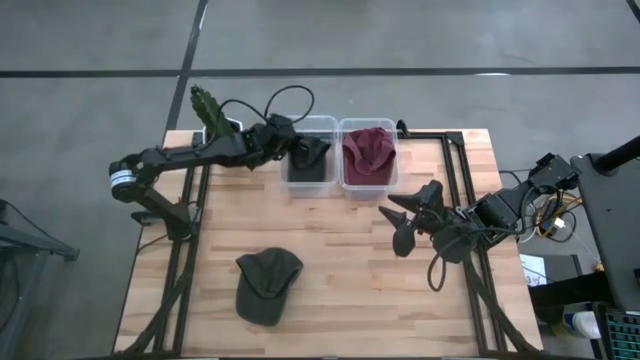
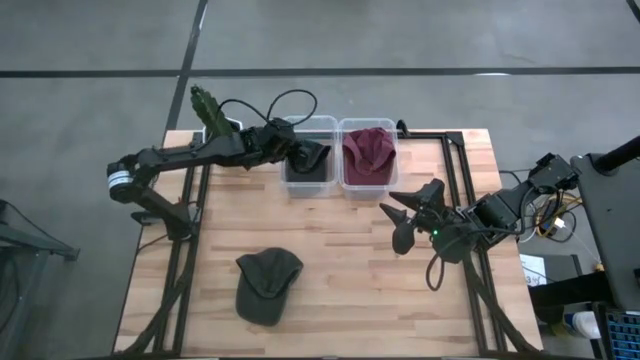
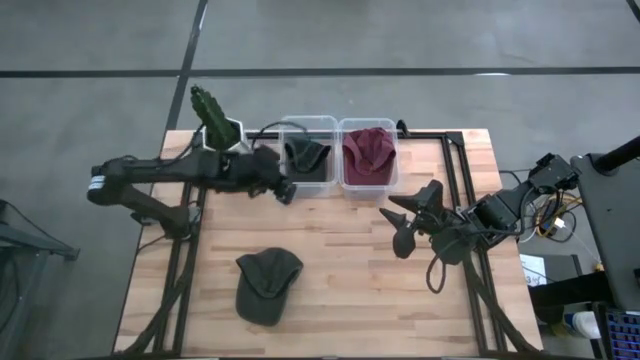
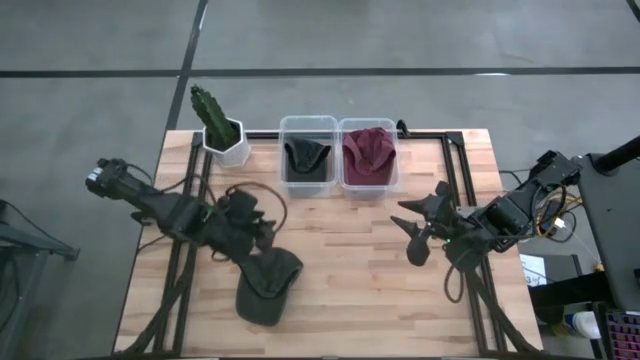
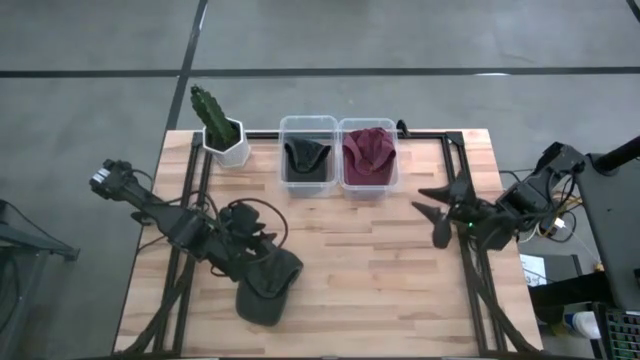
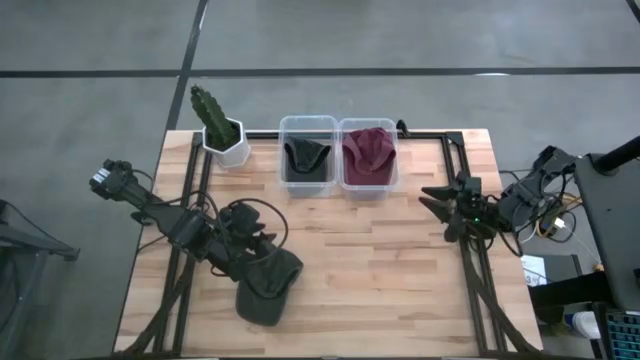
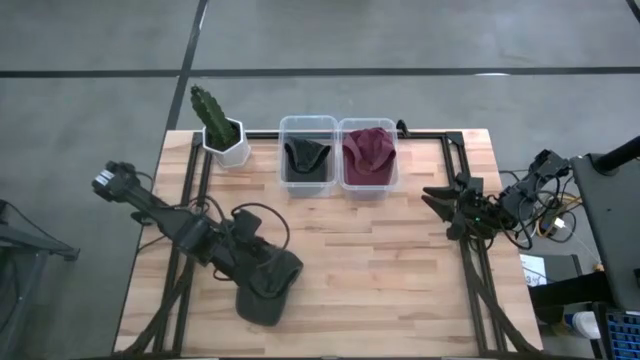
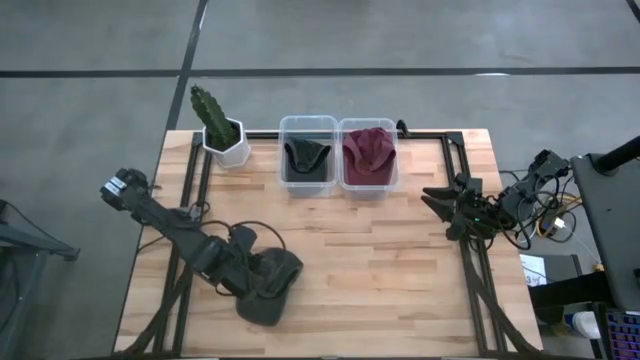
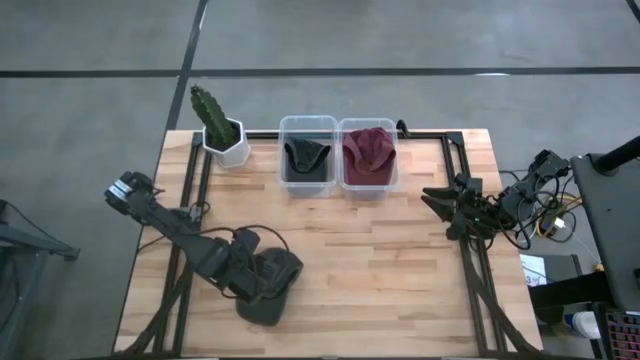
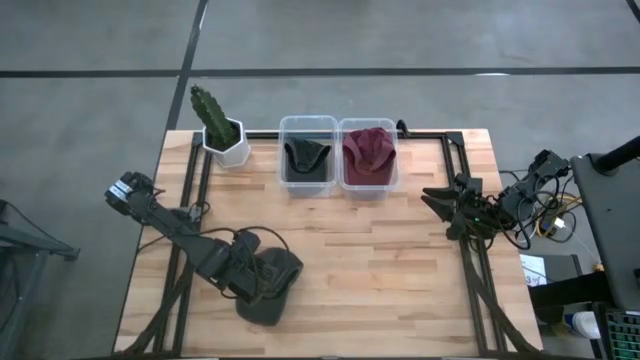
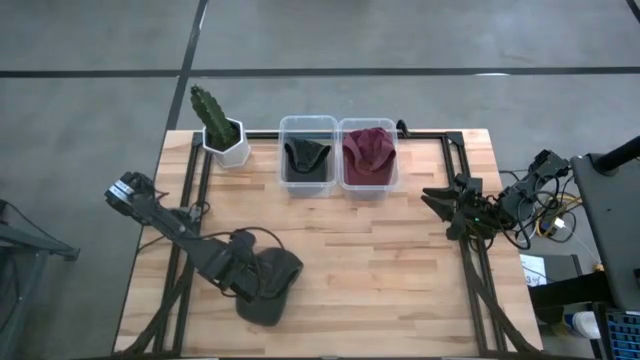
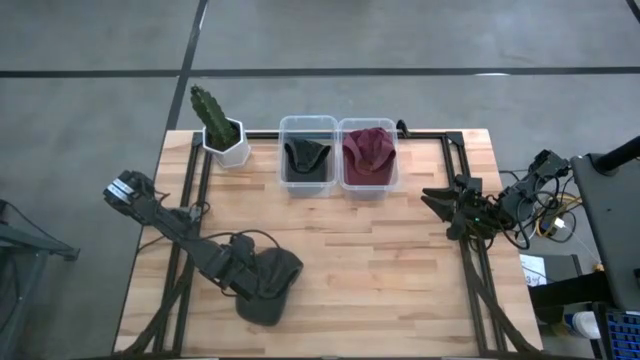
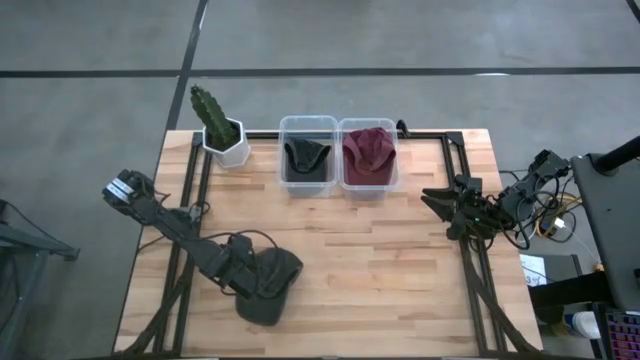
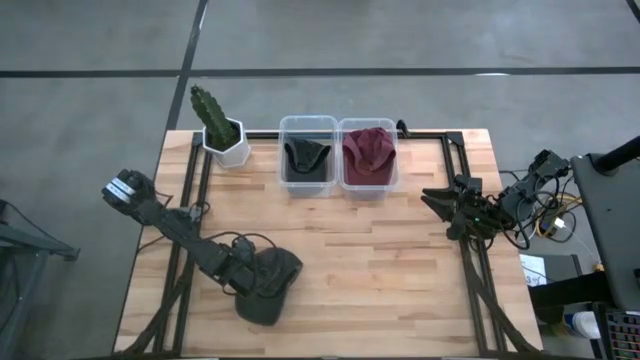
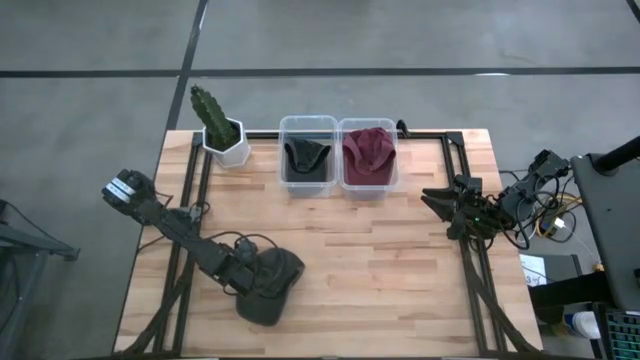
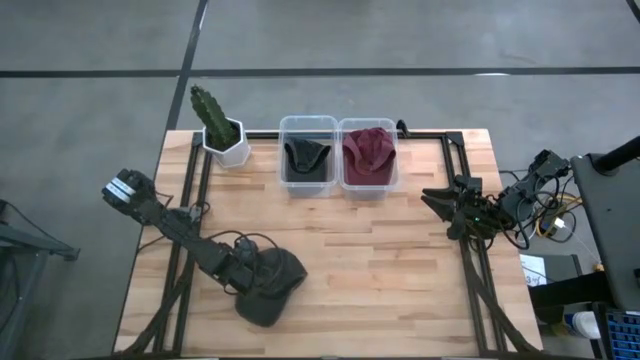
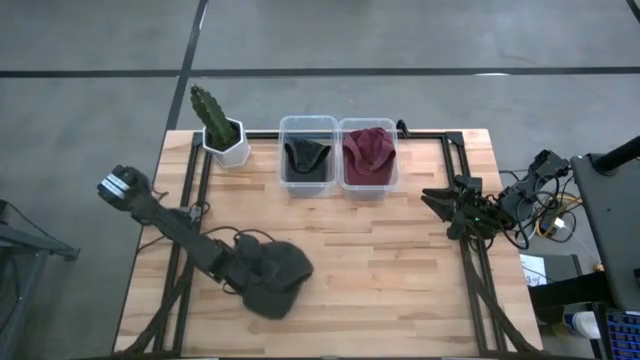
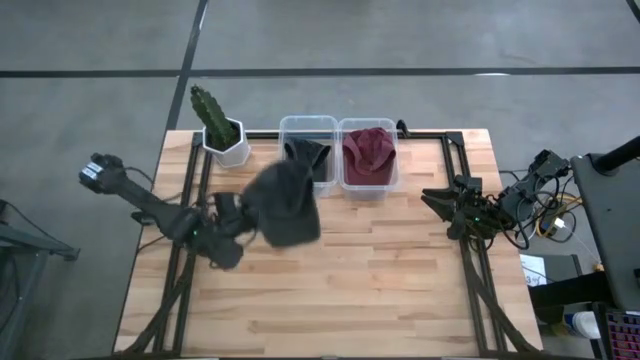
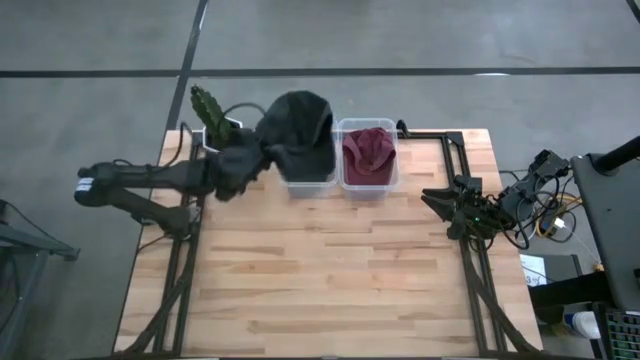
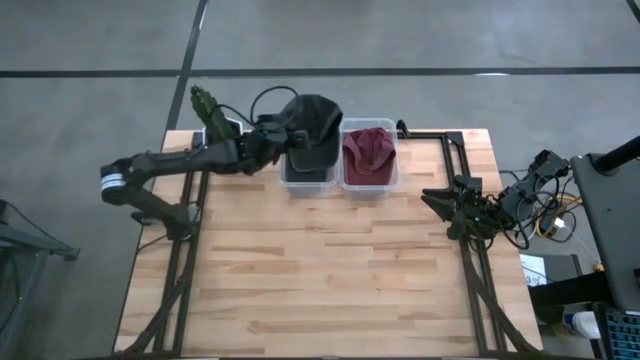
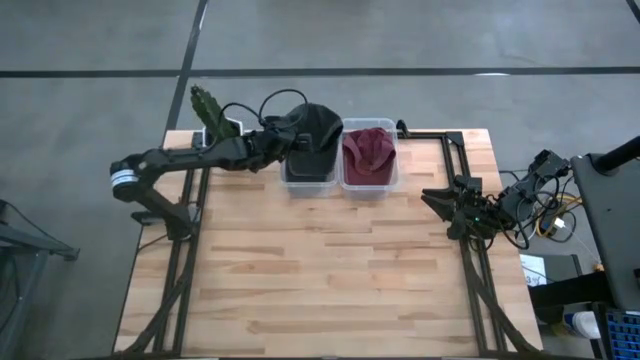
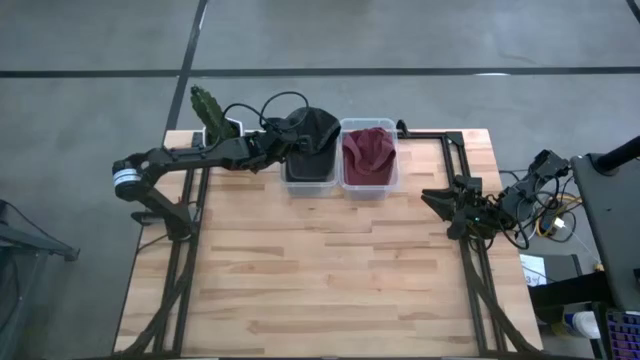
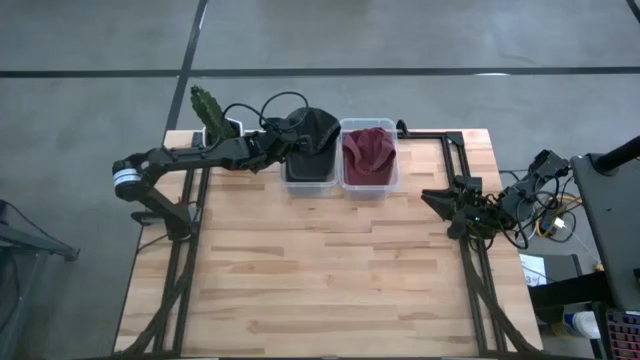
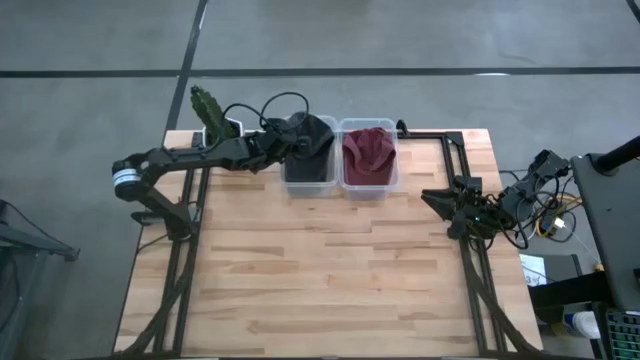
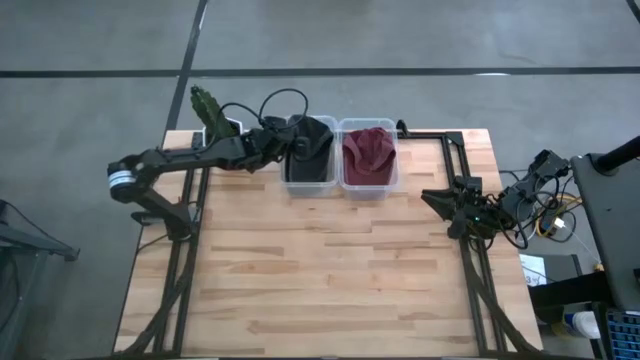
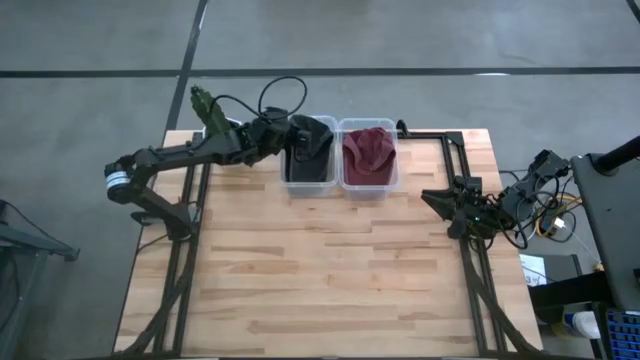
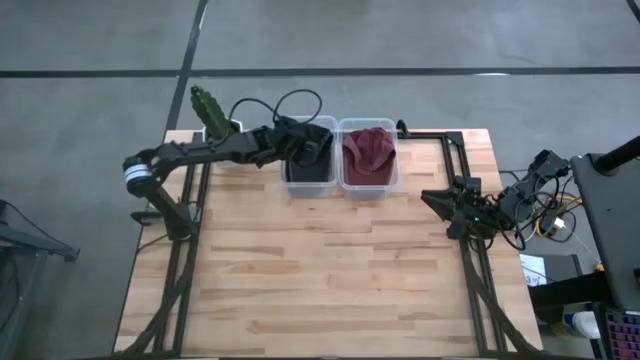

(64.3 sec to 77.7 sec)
Task: Pick & Place hat
Put the black cap into the left transparent bin

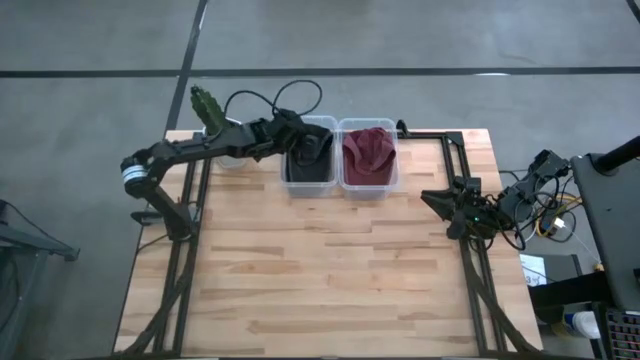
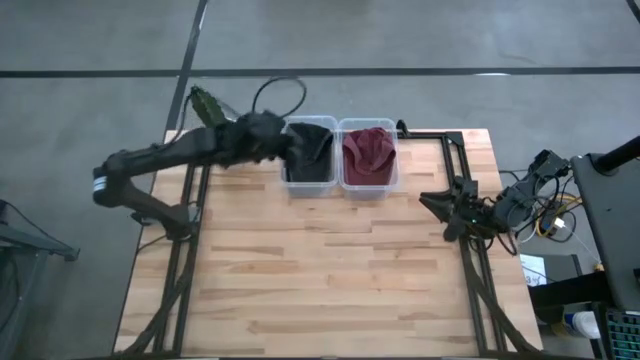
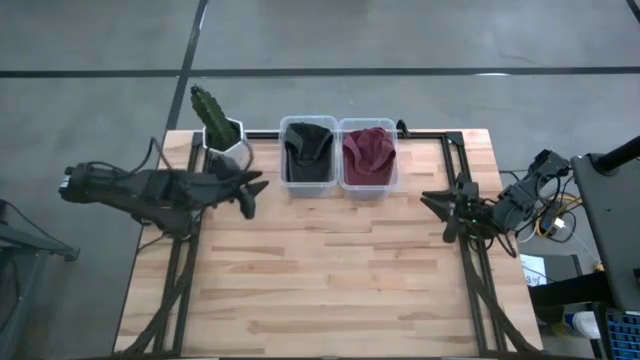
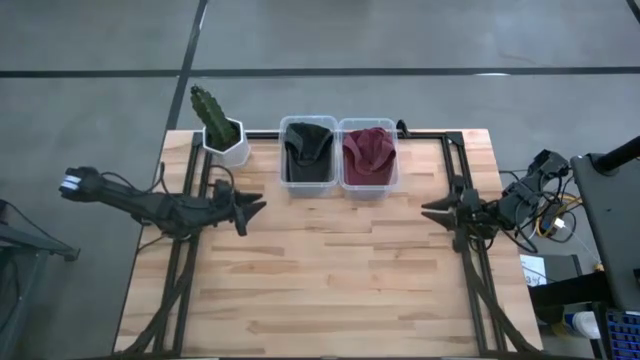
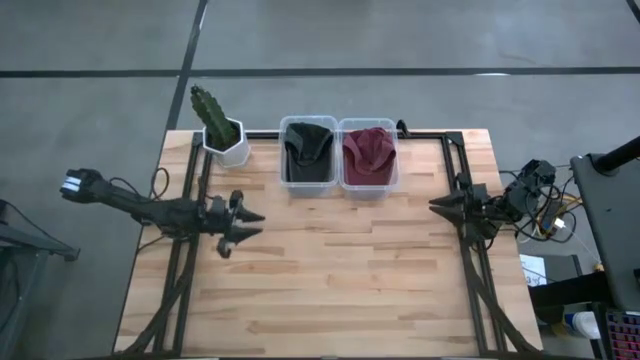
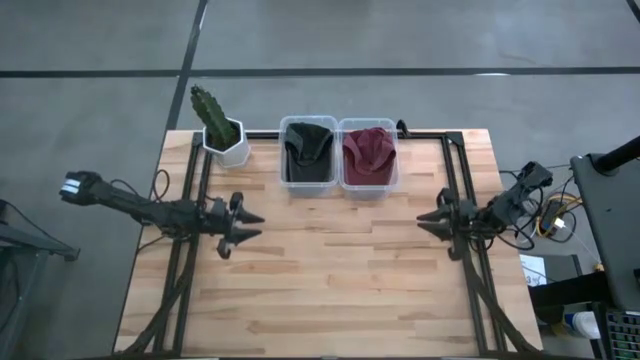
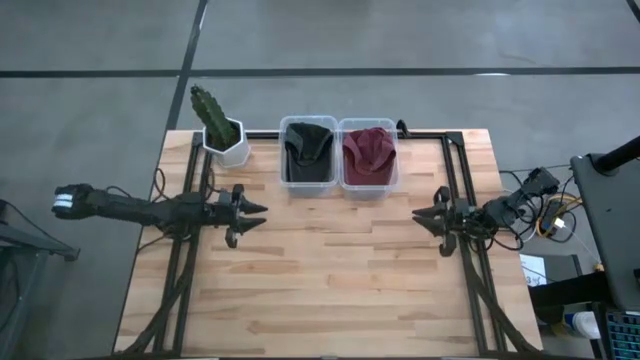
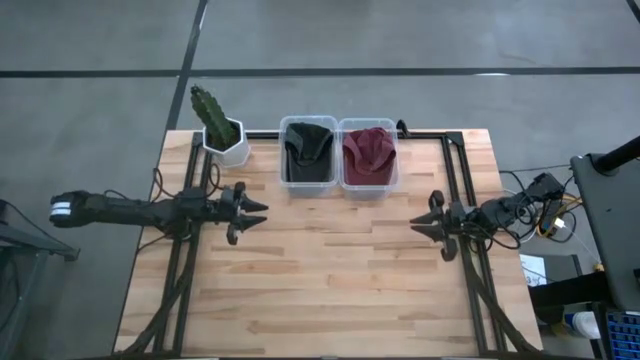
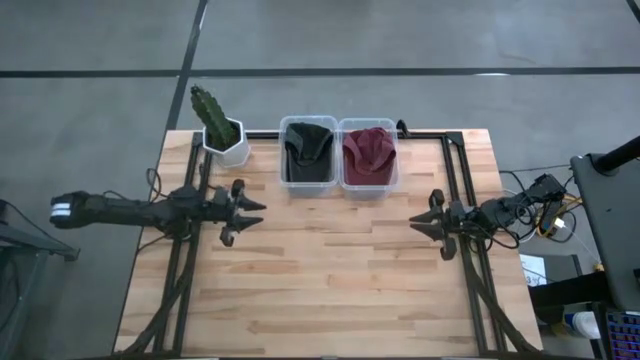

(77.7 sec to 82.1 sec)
Return to Home Position

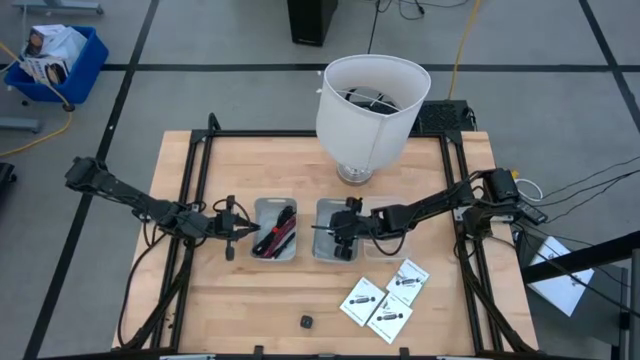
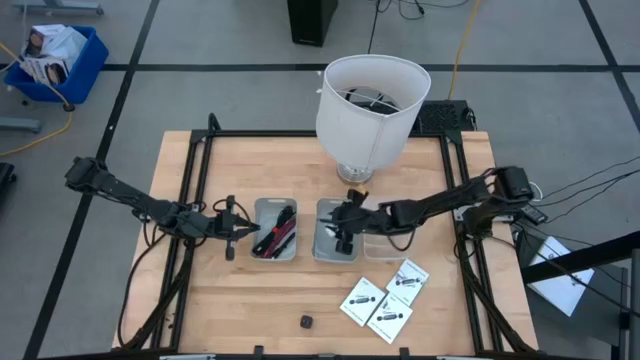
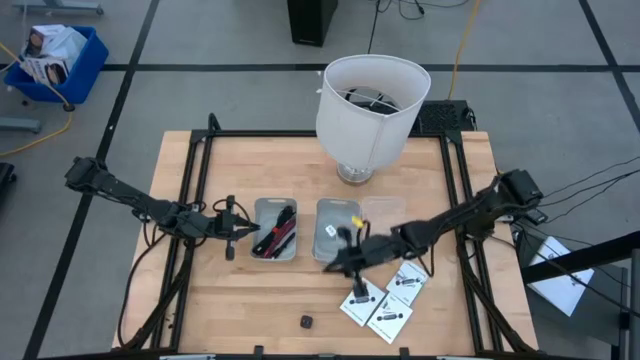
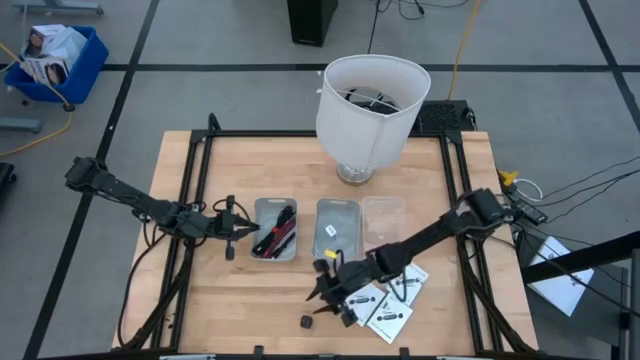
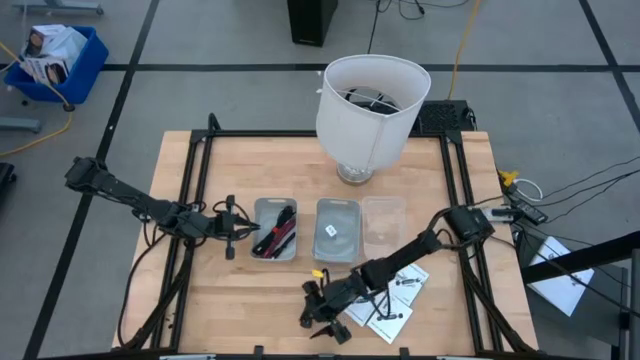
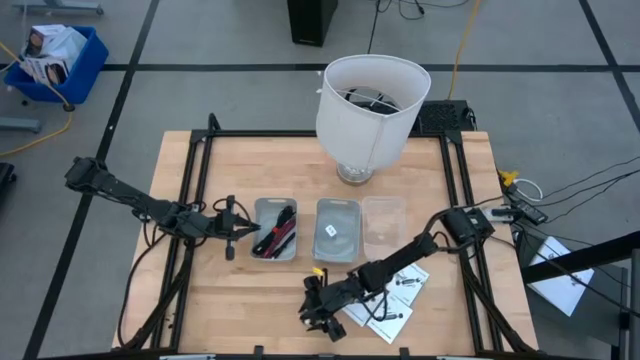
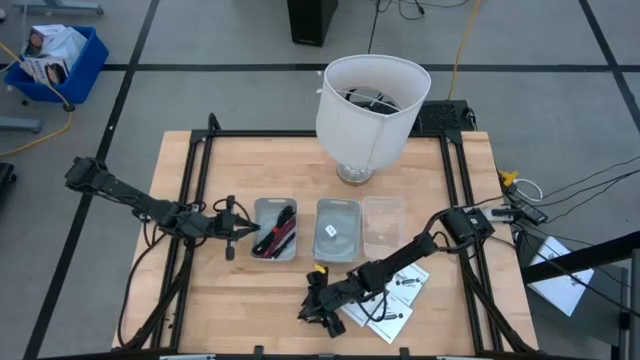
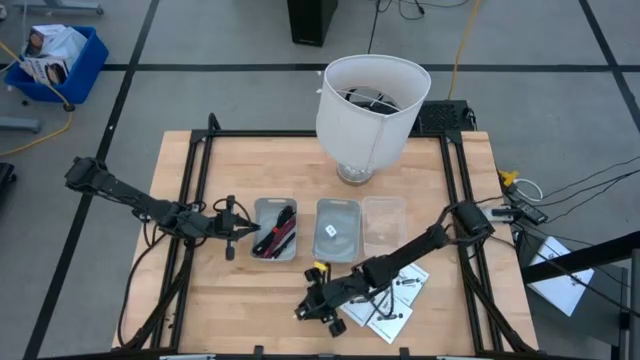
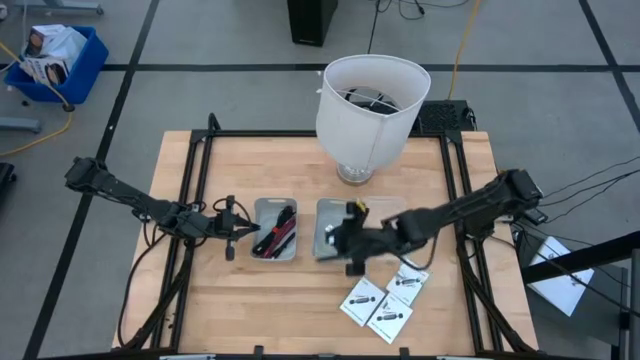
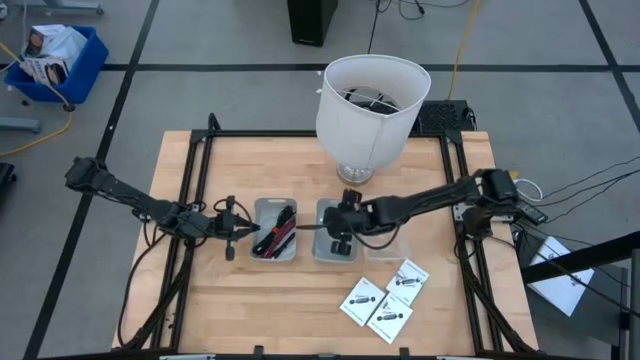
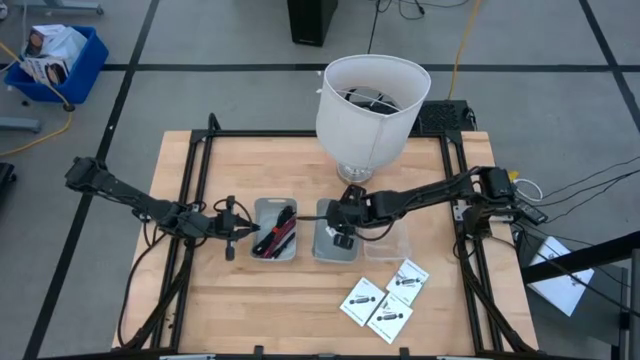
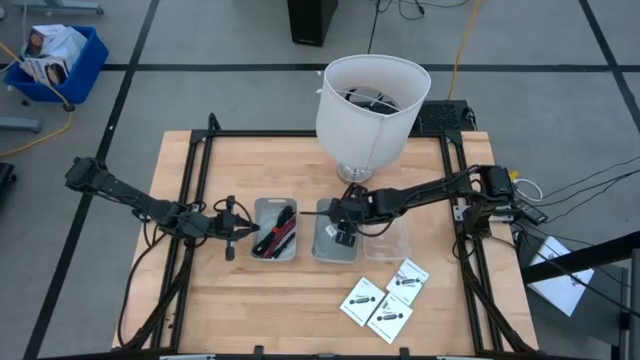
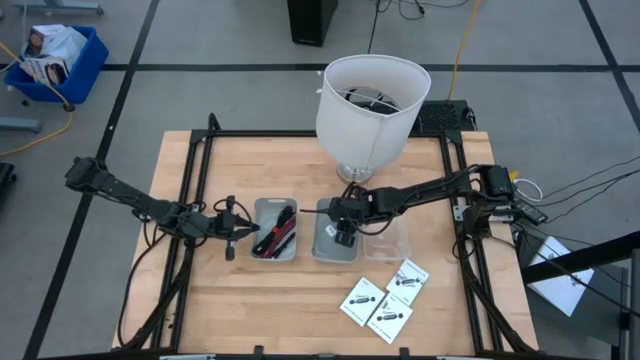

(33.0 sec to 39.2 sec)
Task: Pick and place items into bin
Put the black charger adapter into the right gray bin
